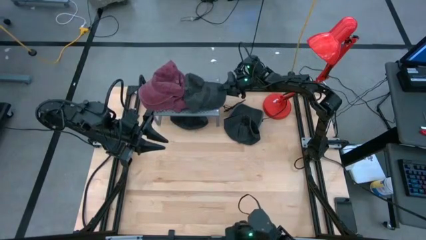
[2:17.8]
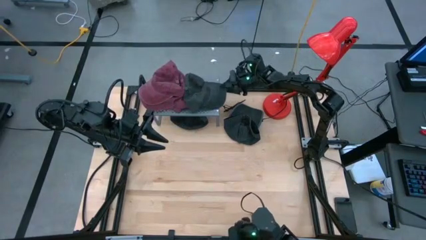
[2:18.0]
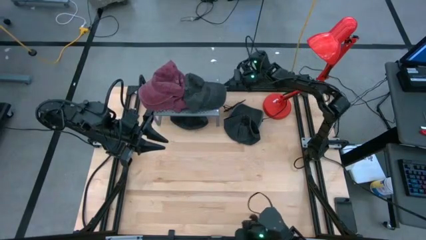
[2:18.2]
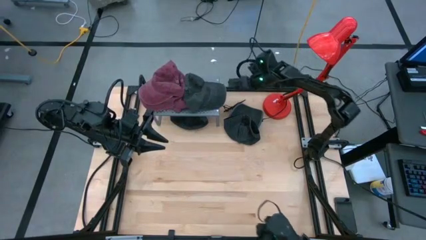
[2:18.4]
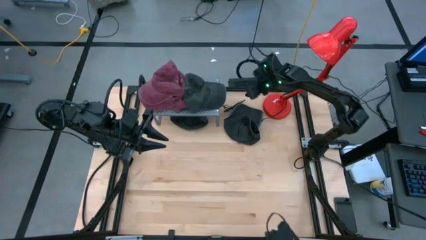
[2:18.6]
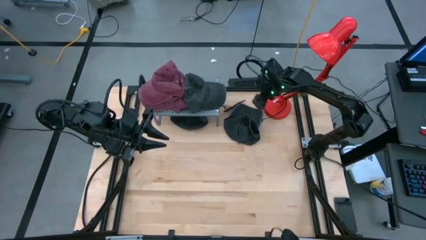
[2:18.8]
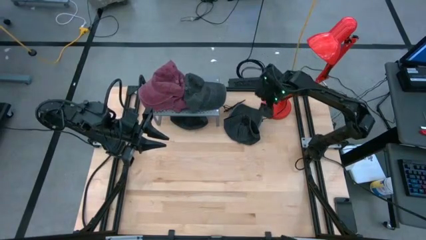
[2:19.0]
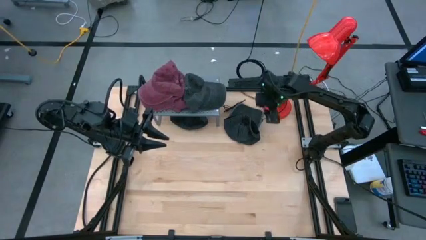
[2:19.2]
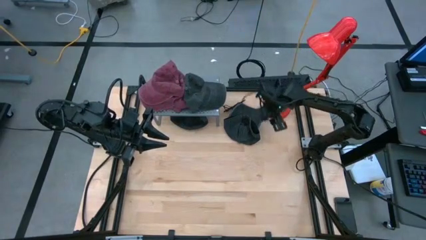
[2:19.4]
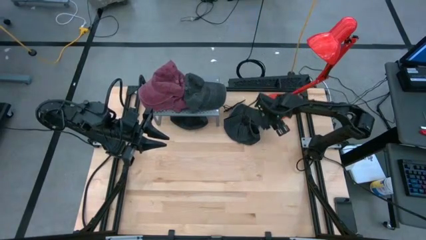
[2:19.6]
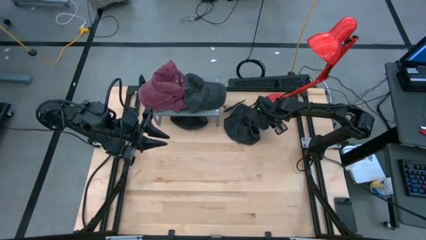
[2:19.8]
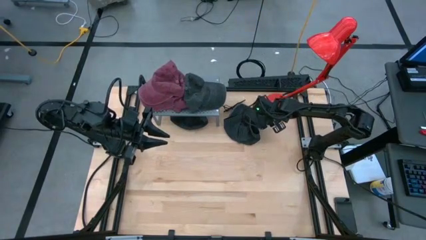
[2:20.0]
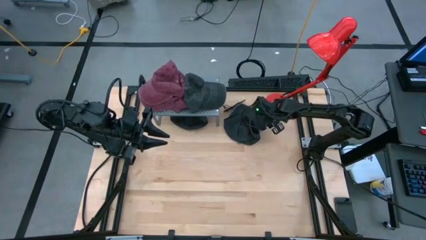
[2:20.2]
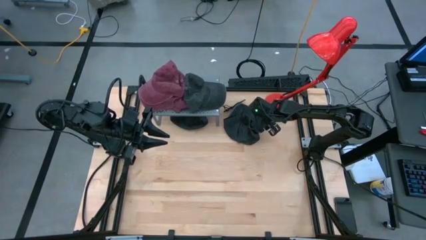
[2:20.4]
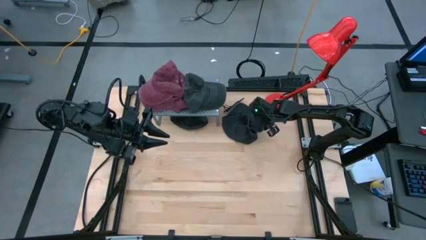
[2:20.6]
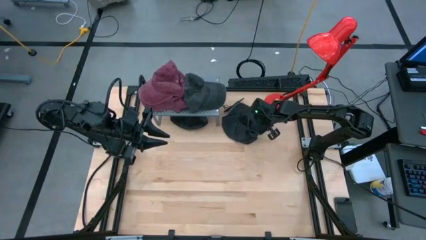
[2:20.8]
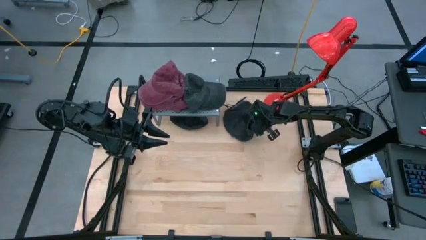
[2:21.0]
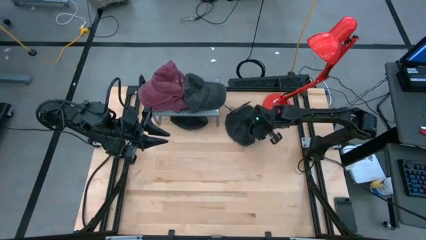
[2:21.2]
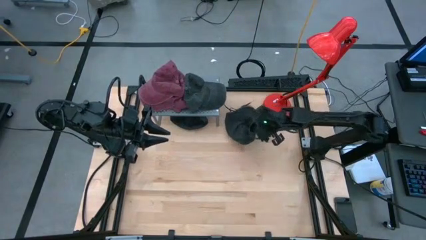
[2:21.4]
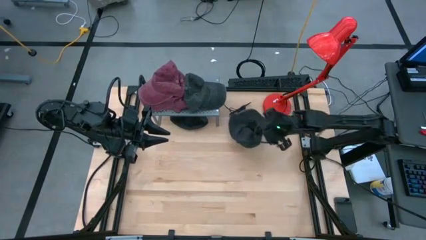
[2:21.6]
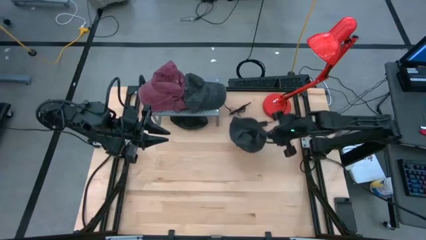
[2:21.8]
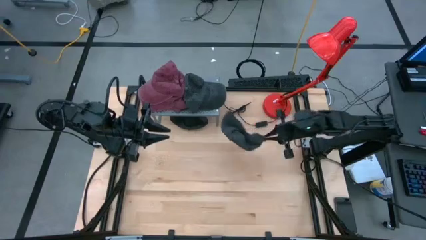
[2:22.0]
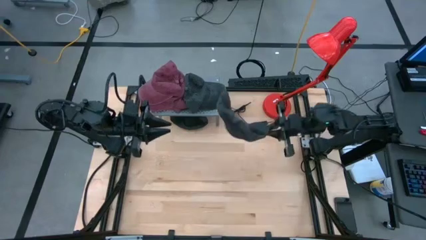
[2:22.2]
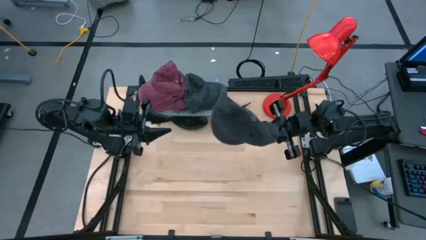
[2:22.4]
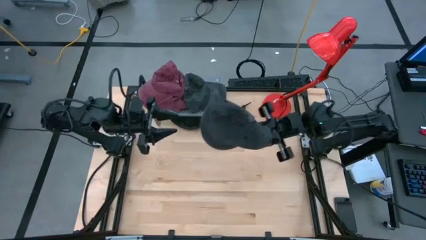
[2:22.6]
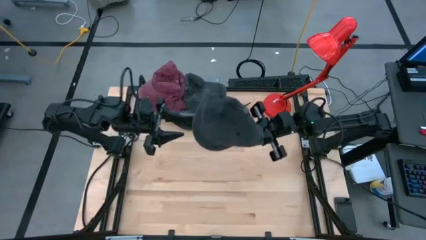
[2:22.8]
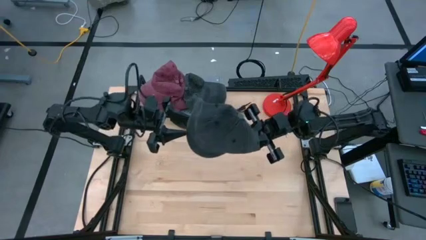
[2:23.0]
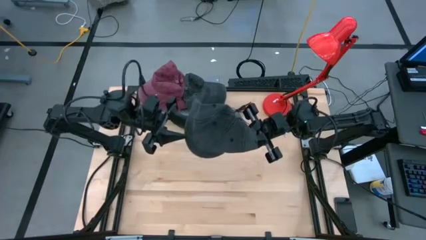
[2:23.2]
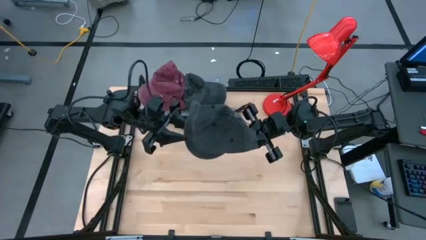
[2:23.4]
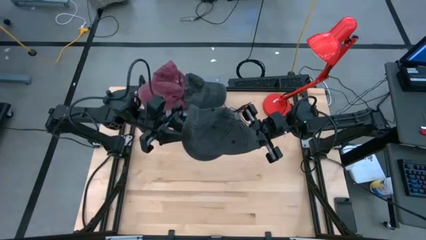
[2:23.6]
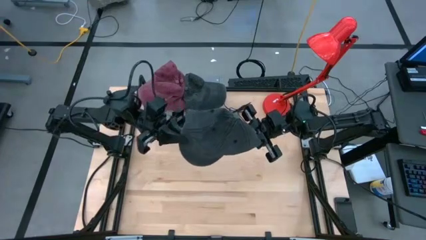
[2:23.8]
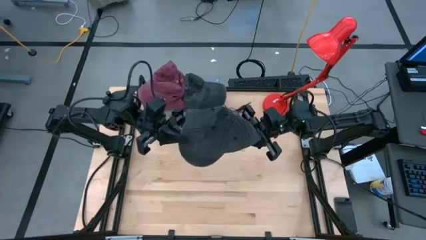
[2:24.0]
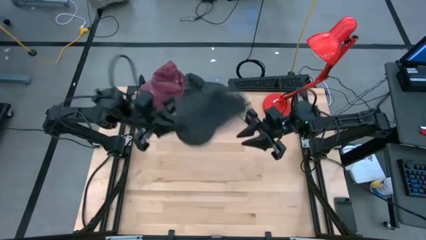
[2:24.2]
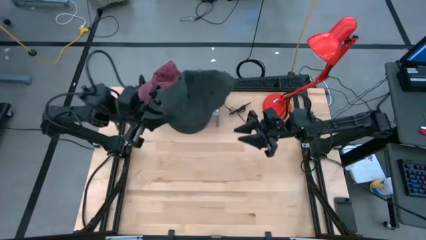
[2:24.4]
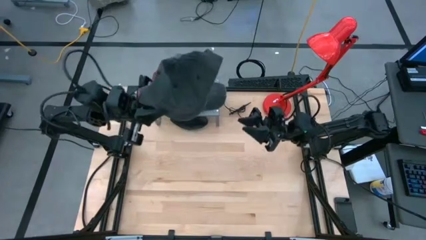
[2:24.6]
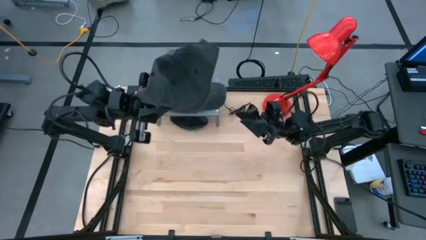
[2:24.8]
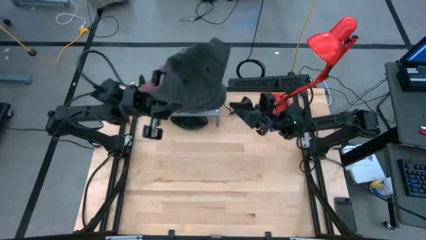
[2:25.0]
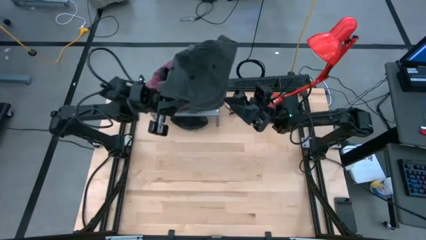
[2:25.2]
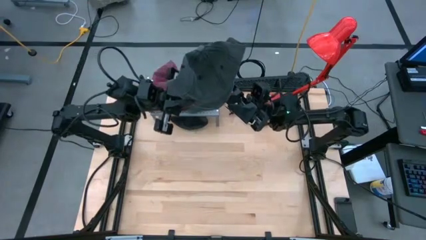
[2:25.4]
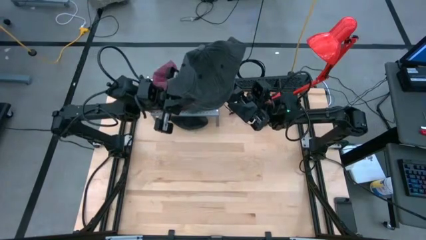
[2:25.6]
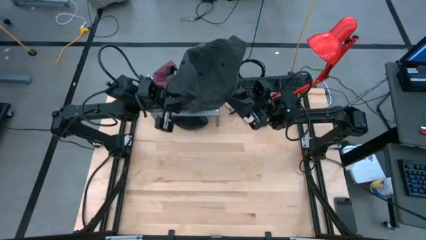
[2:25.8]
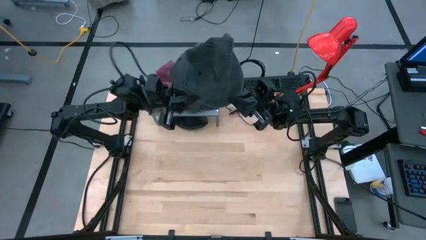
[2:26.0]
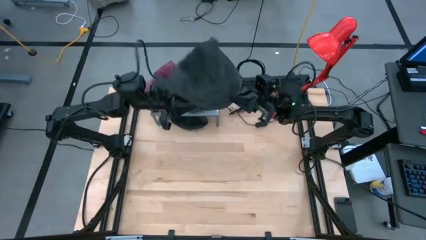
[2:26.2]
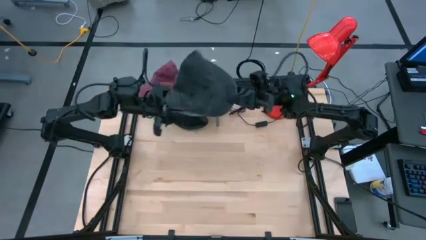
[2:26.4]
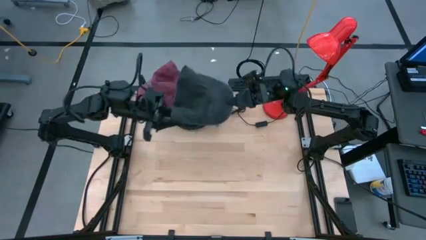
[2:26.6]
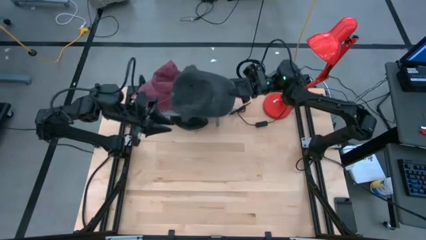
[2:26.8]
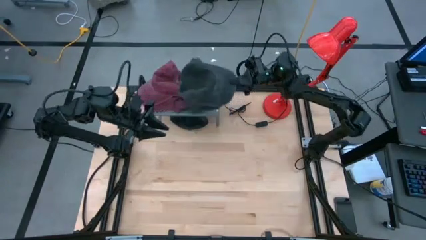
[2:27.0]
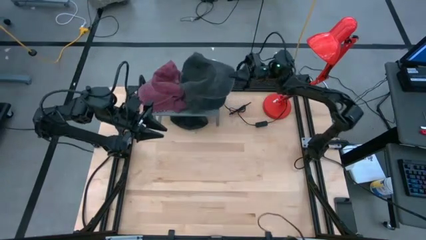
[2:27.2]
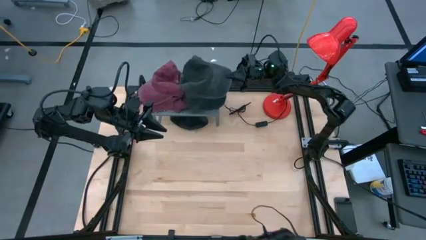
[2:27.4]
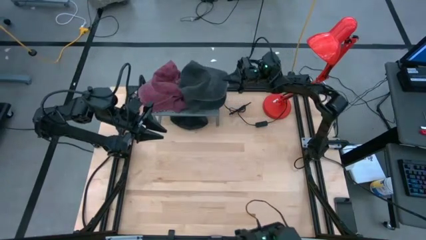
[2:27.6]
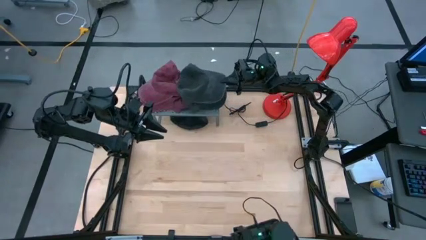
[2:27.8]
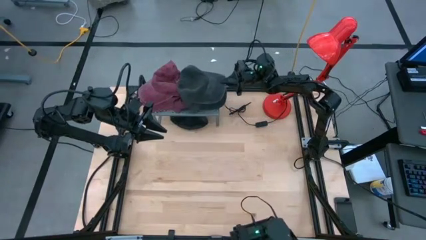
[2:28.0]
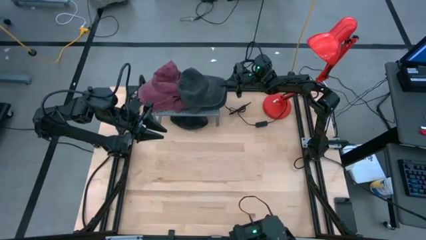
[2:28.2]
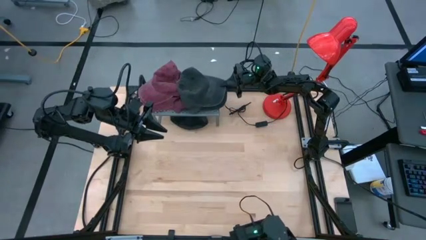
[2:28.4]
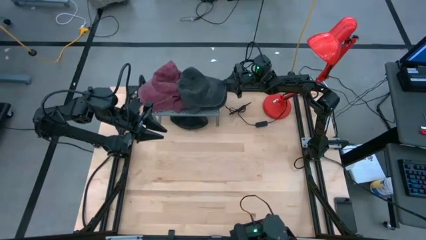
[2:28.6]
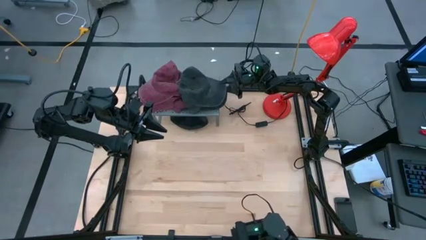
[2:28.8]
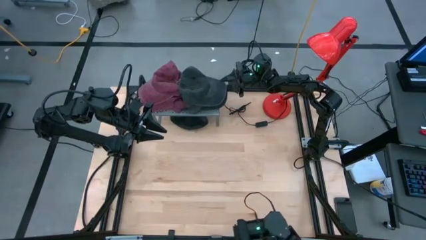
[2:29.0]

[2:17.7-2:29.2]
Task: Pick & Place hat
Stack the right black cap on top of the black cap on the shelf

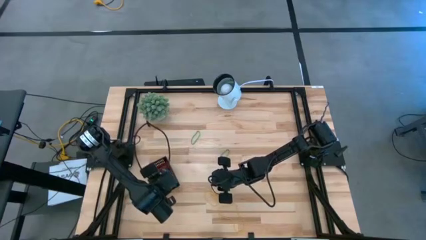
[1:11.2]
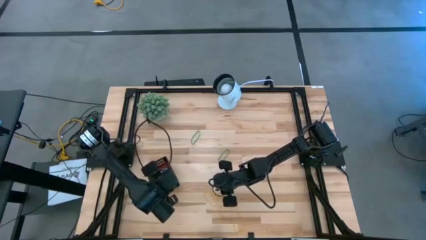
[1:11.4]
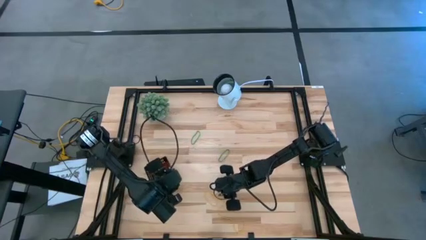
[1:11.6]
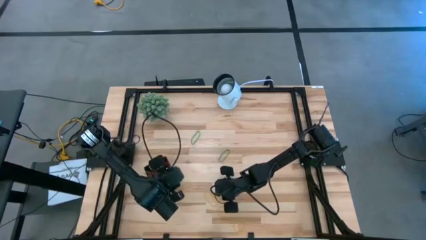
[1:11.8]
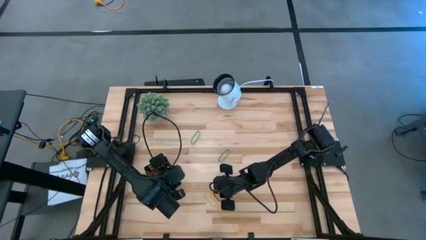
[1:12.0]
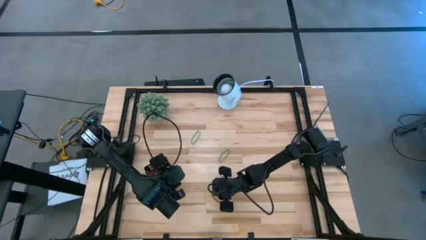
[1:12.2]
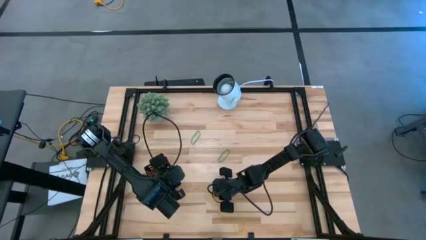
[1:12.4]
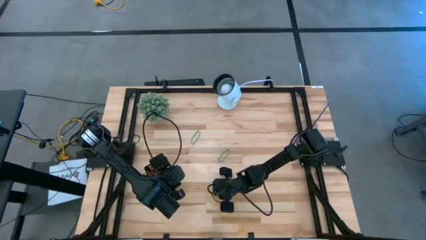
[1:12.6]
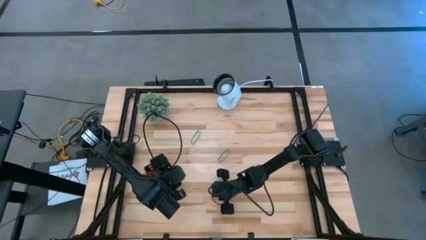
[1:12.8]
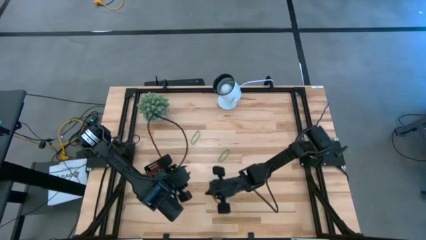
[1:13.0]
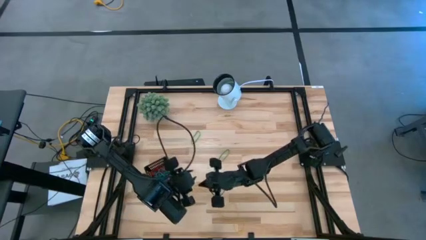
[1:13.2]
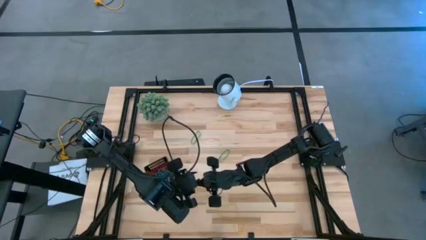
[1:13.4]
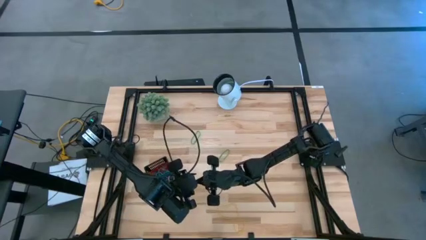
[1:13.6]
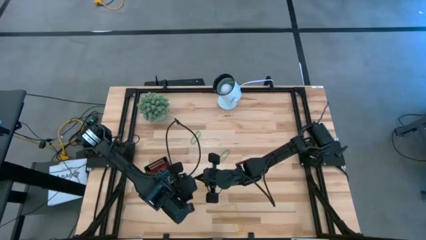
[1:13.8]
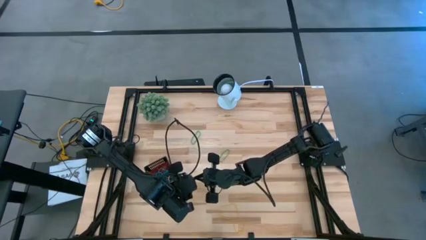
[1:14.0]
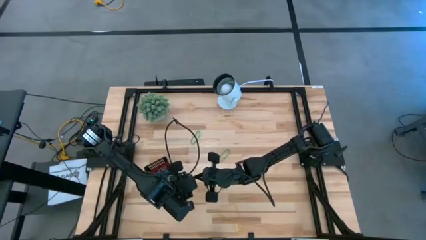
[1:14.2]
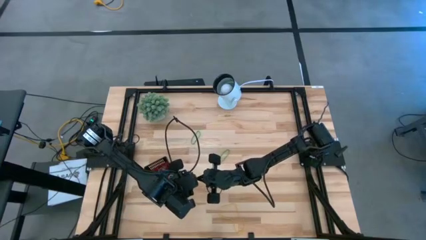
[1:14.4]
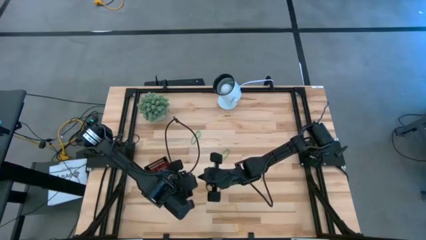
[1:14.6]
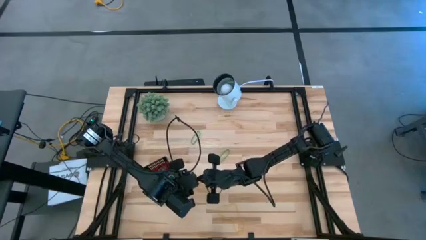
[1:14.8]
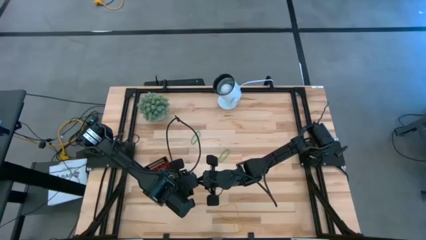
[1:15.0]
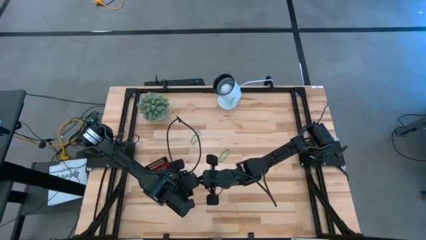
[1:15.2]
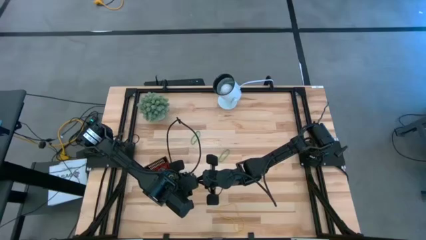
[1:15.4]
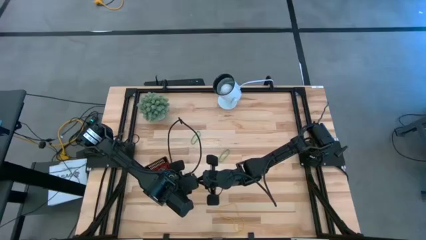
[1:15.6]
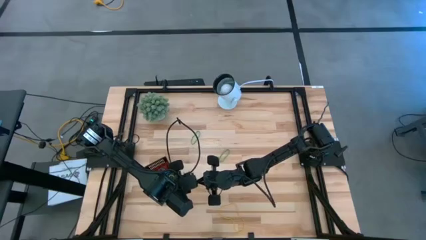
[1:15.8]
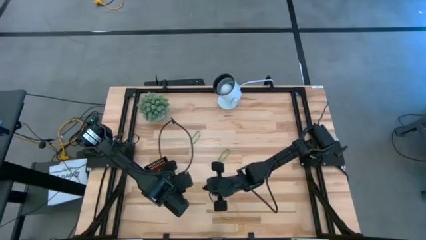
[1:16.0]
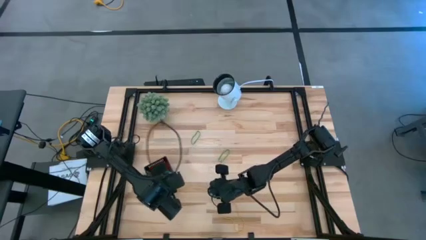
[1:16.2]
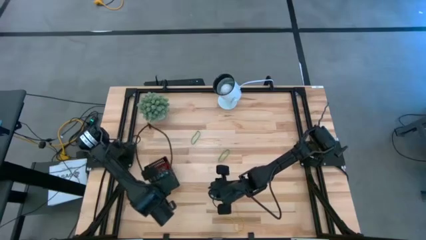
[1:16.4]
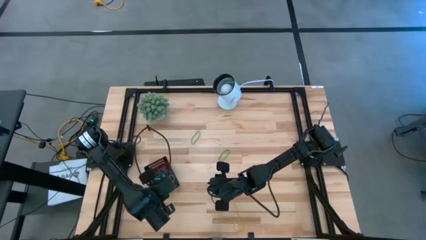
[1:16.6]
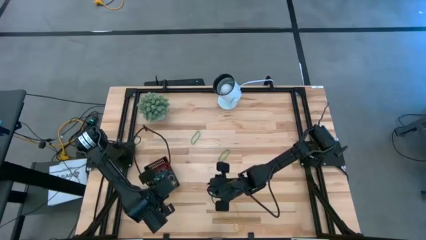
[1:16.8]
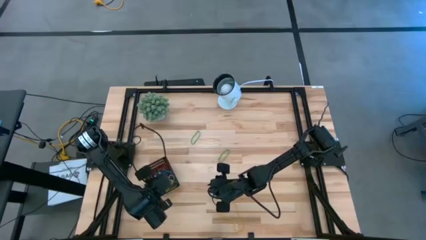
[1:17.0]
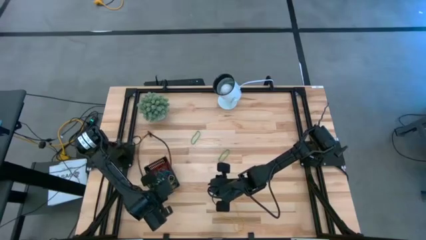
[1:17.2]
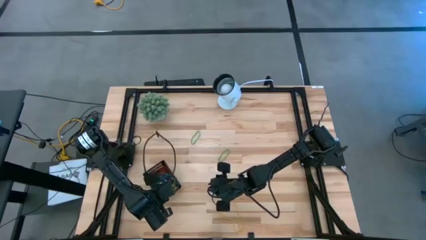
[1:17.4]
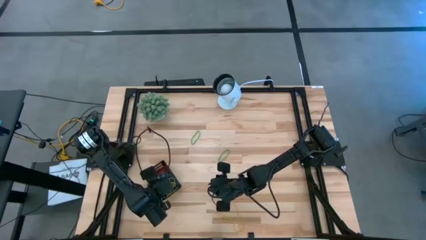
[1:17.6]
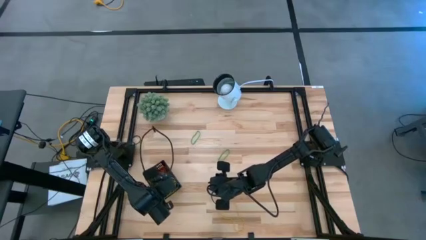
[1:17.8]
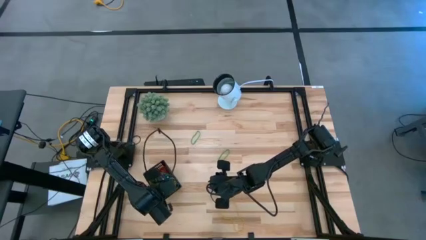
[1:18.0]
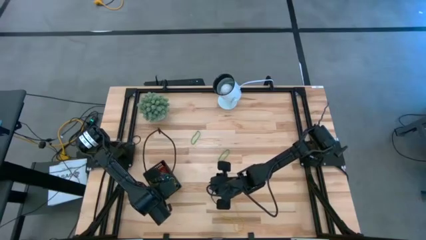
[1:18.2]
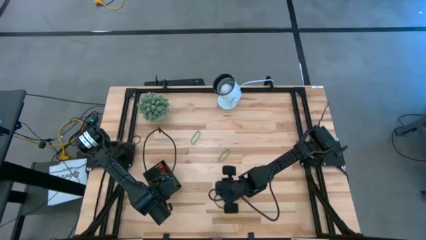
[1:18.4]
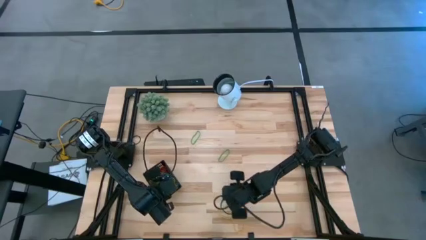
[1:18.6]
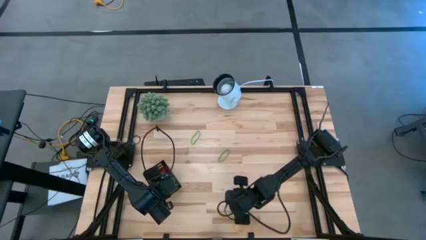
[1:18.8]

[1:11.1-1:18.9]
Task: Pick and place items into bin
Put the yellow rubber band into the black bin
